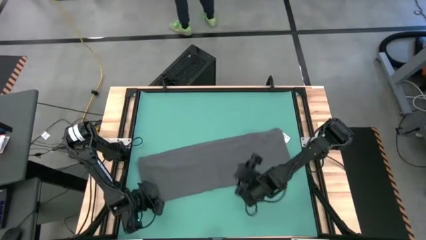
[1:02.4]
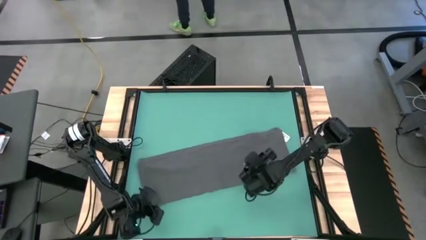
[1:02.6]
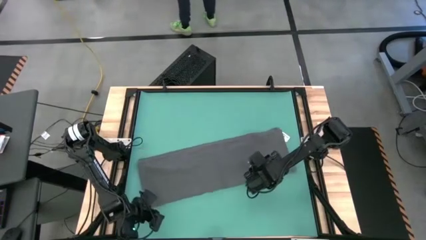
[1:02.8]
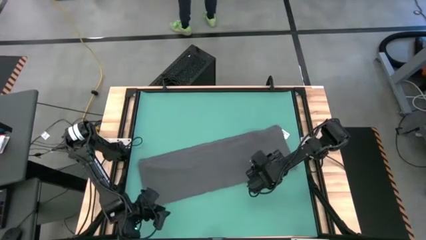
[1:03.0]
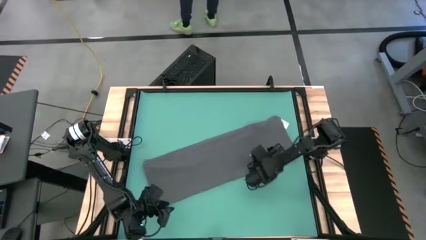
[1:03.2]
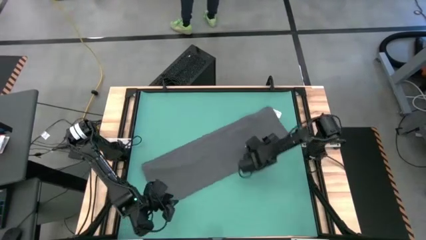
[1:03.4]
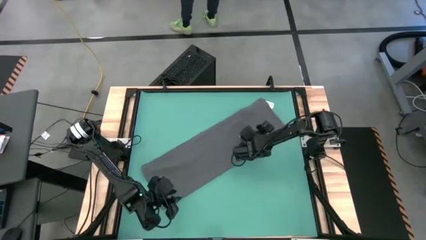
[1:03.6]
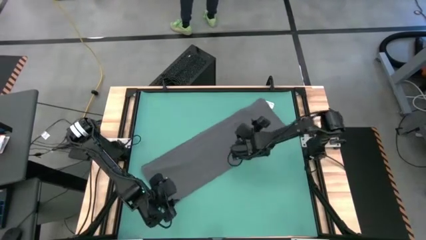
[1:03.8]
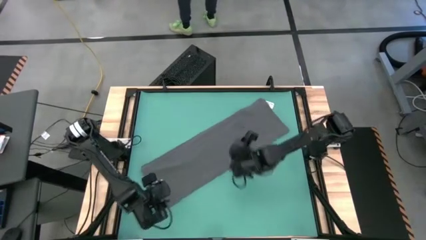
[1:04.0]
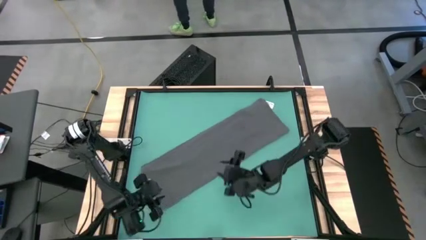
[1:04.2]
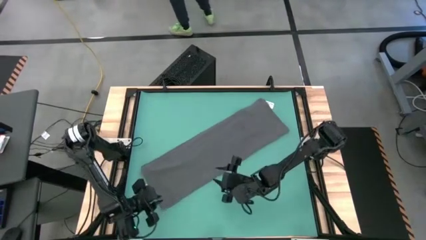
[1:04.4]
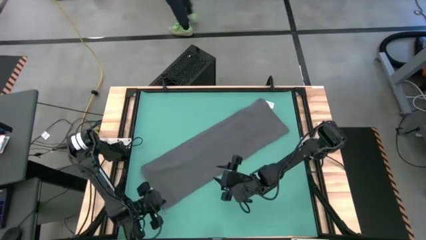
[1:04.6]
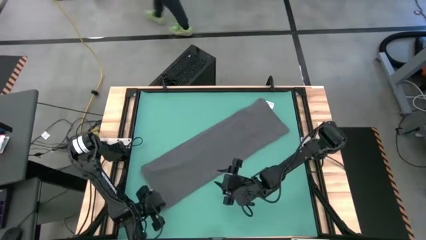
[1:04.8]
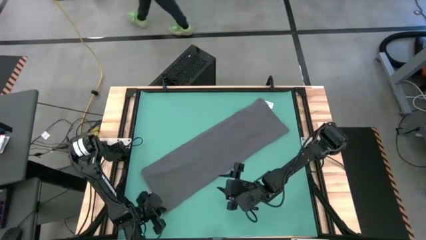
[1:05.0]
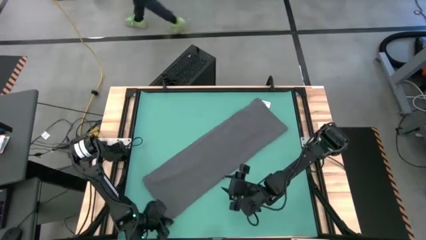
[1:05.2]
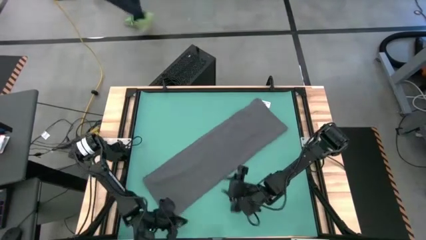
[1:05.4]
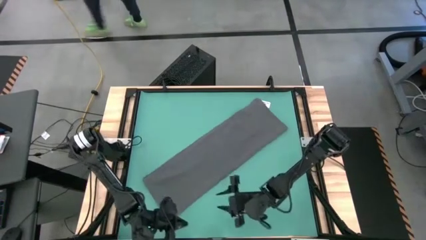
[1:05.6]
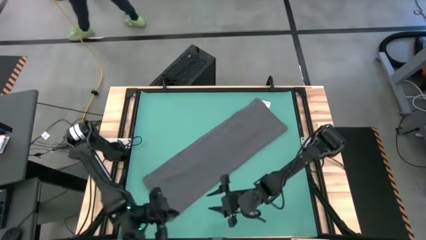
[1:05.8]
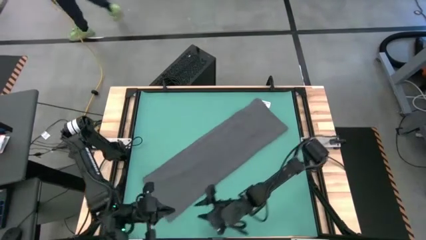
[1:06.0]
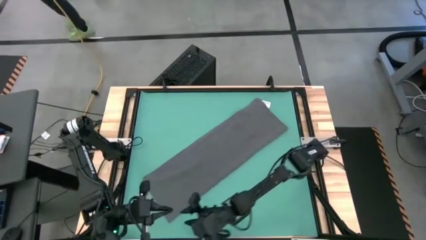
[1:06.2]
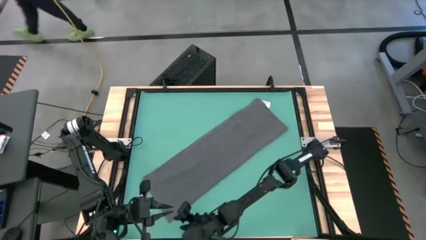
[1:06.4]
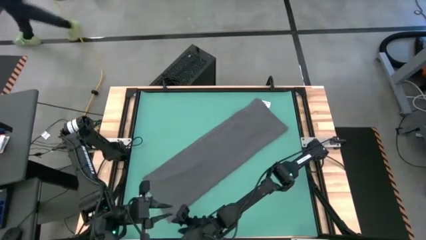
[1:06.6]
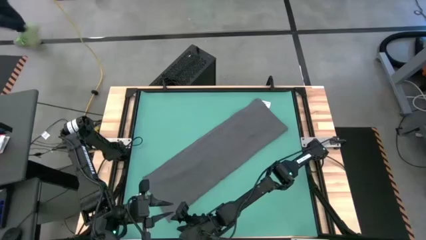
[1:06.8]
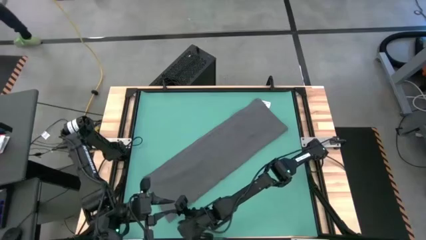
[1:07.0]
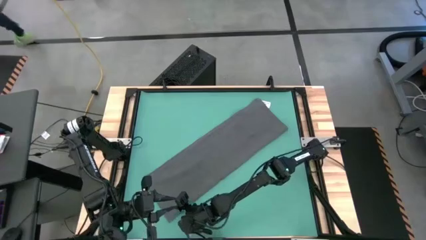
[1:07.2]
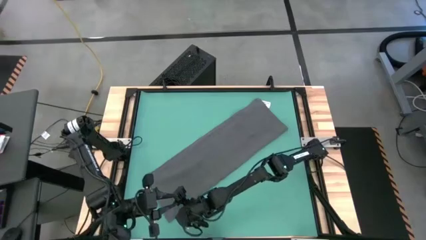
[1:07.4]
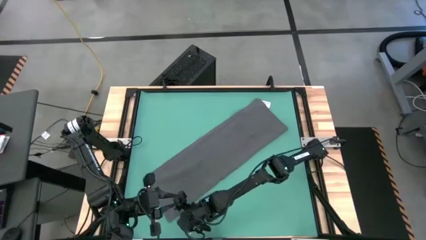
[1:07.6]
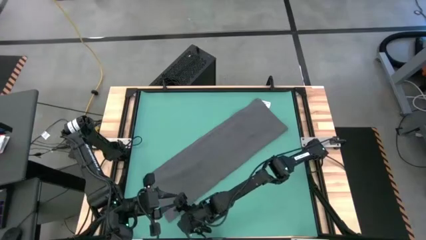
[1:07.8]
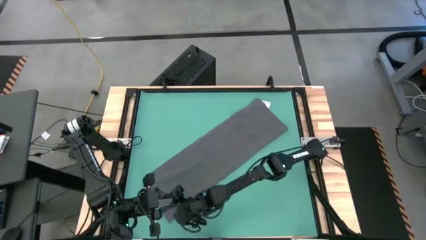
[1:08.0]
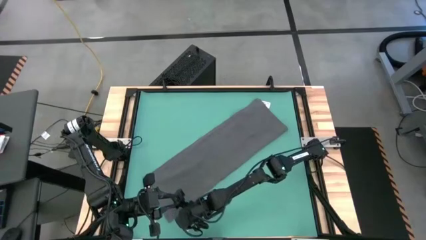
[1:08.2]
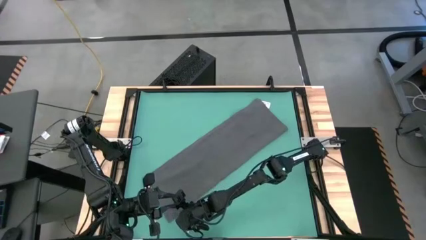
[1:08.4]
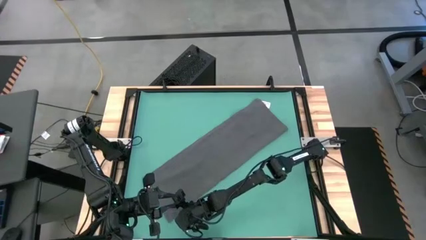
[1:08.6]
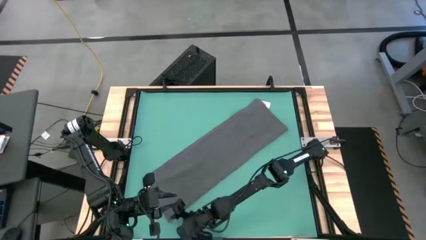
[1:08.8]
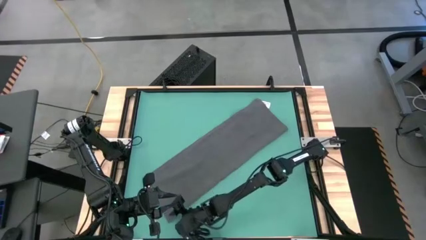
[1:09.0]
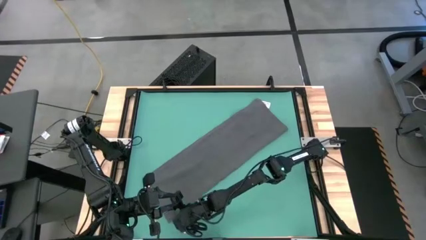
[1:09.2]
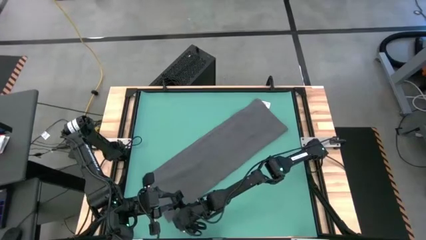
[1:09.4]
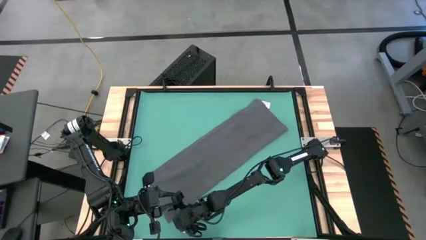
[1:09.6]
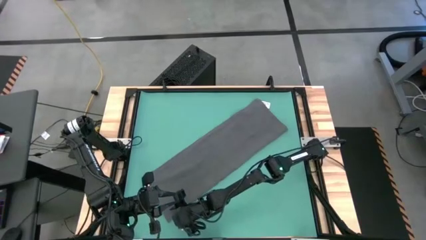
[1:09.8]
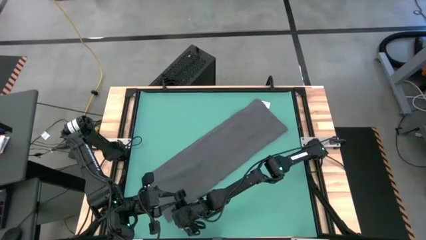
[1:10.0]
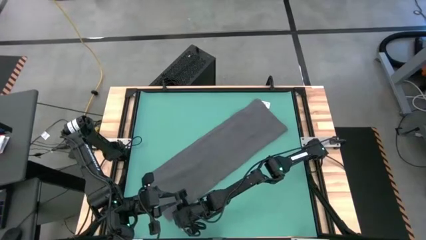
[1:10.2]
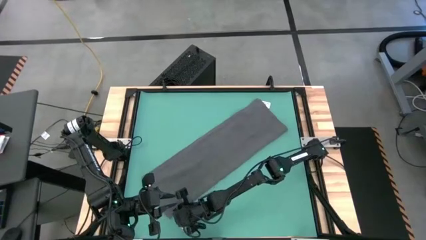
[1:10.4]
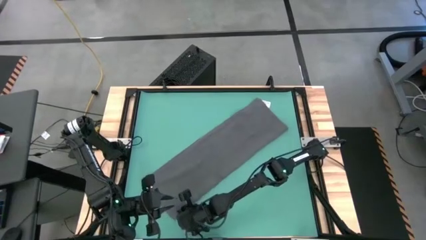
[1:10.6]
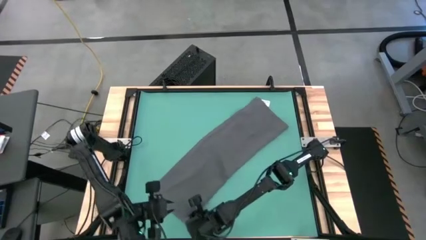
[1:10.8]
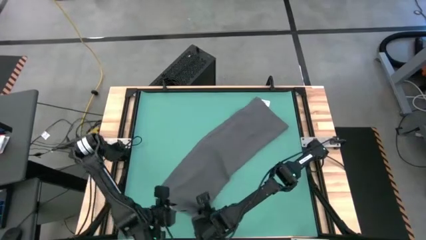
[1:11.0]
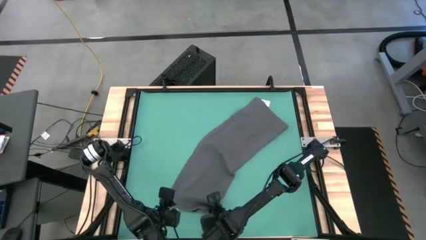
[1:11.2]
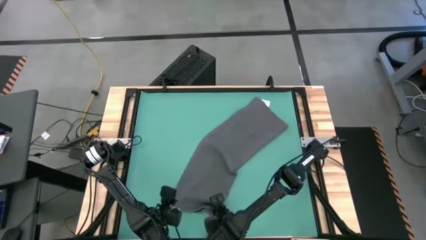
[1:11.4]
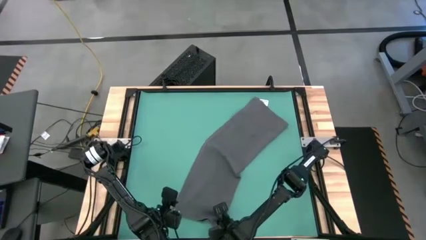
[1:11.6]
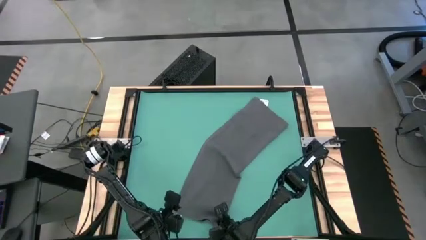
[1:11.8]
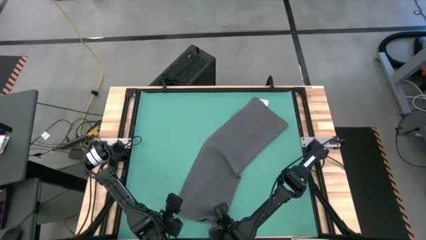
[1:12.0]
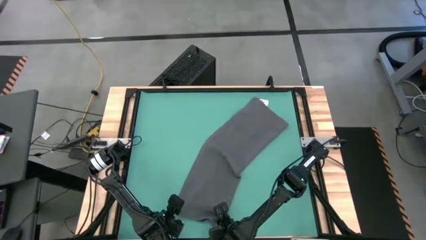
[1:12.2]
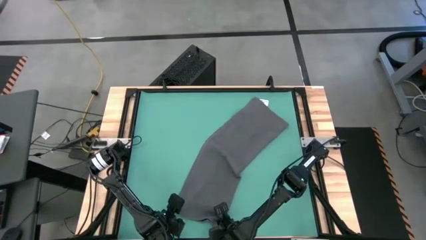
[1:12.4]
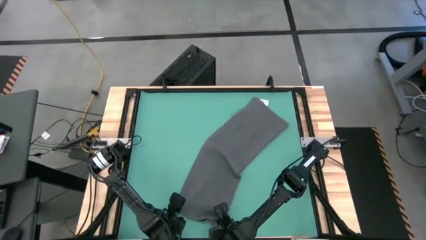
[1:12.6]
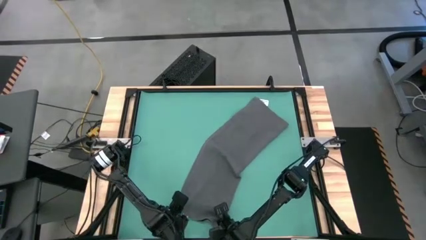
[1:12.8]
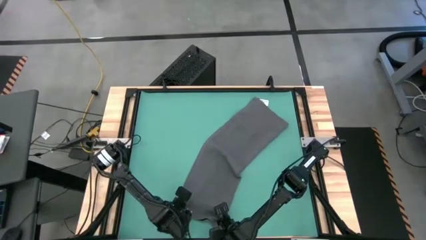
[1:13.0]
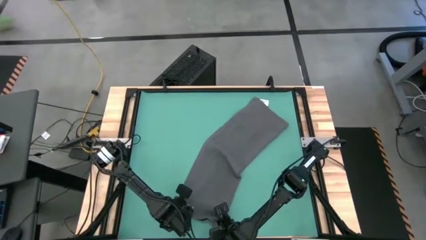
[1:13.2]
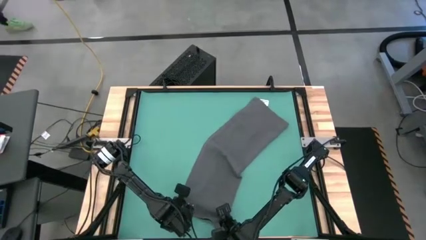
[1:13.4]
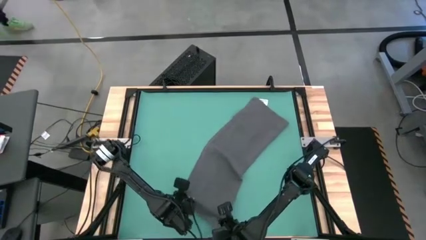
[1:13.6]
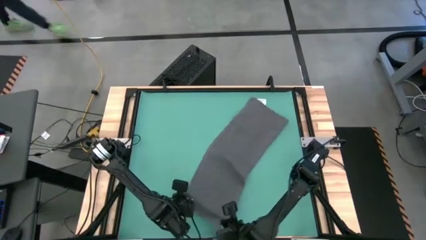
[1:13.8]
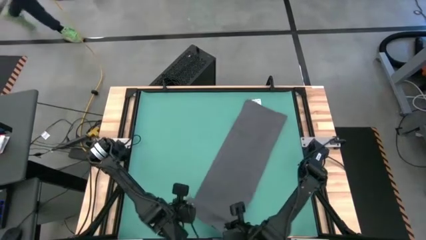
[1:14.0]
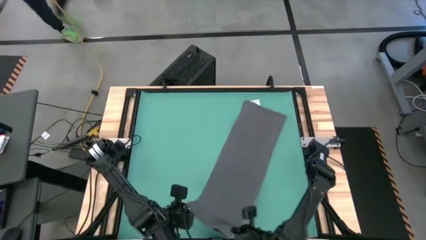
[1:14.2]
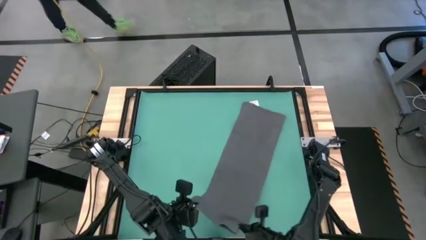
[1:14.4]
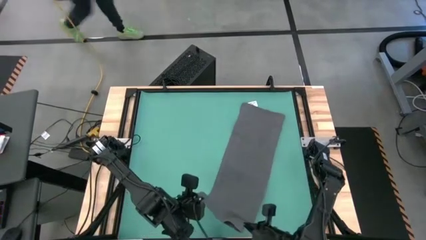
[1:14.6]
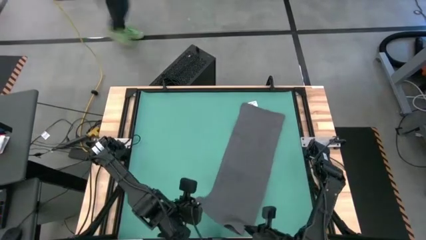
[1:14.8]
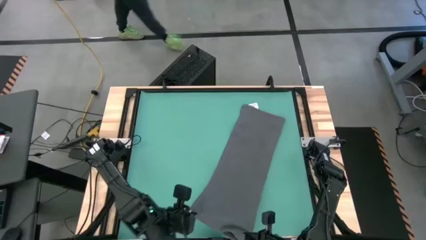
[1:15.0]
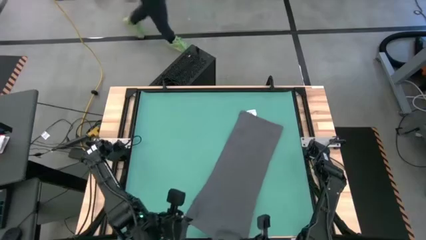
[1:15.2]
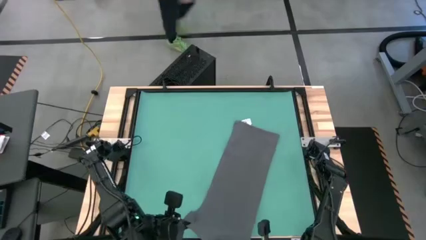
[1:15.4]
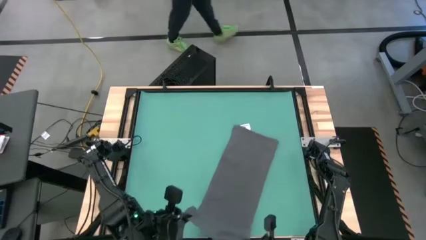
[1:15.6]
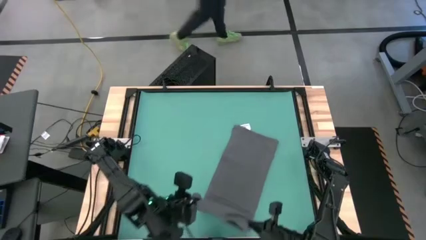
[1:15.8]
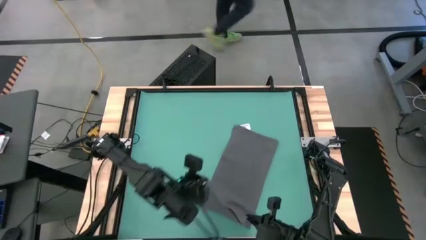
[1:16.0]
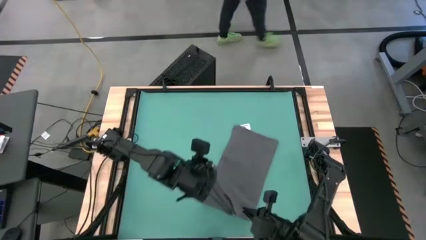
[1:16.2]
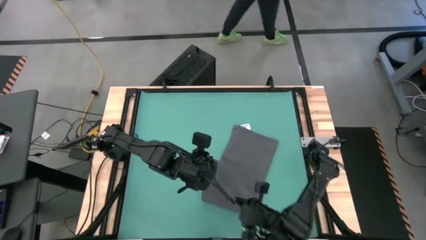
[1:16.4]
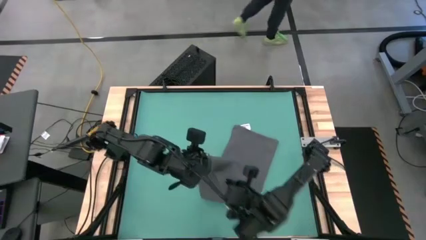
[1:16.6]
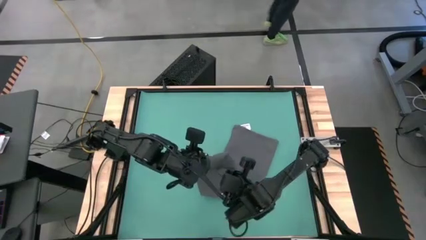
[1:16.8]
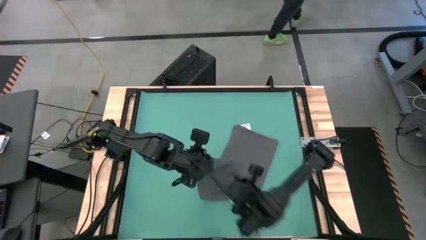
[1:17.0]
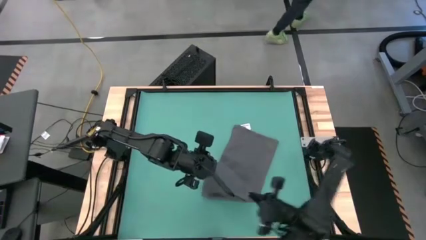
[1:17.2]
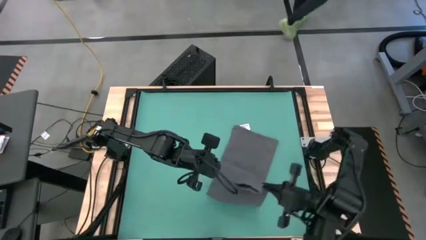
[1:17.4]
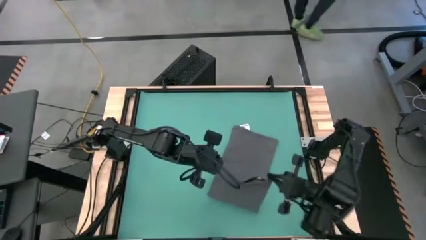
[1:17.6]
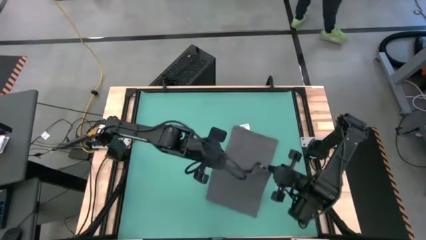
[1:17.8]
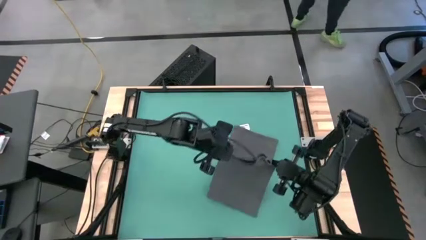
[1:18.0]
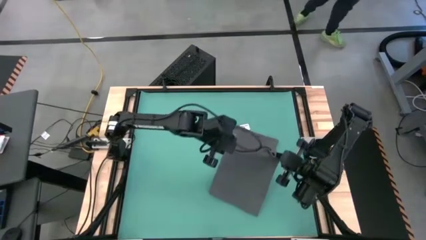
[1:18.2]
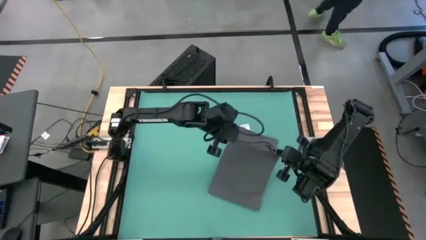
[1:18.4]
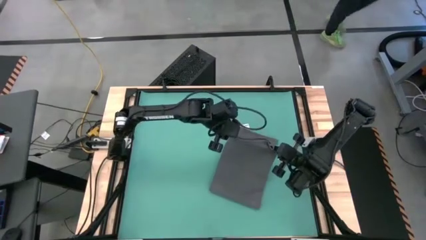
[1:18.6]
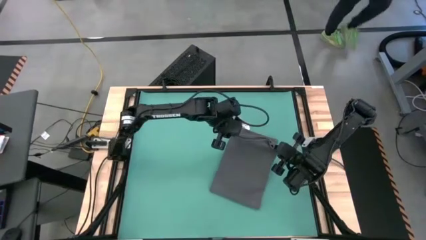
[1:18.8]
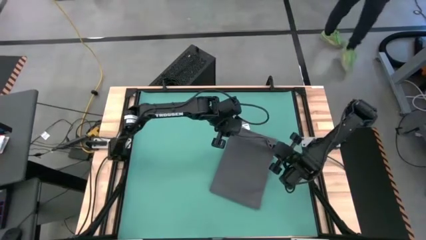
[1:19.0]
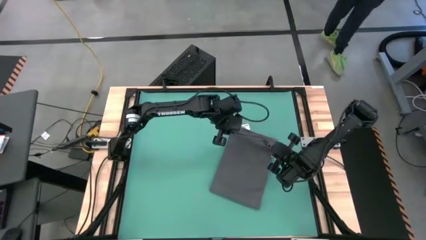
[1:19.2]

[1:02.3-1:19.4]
Task: Roll towel
Roll the gray towel
